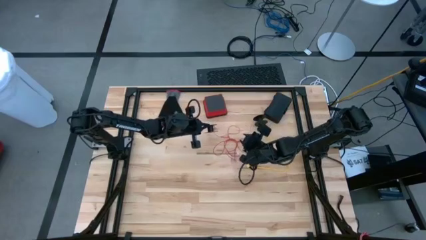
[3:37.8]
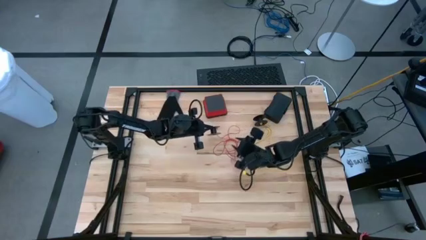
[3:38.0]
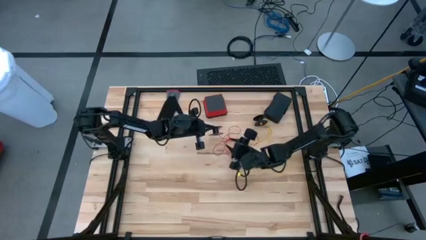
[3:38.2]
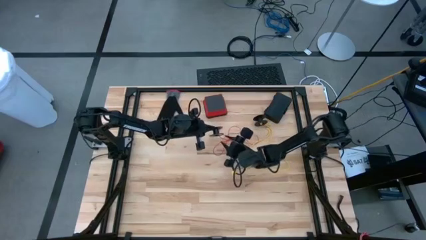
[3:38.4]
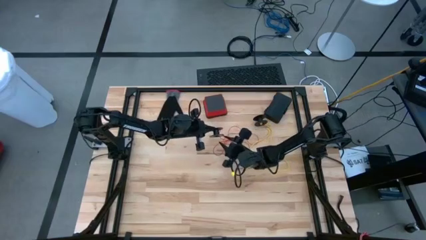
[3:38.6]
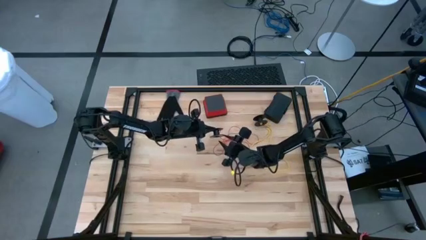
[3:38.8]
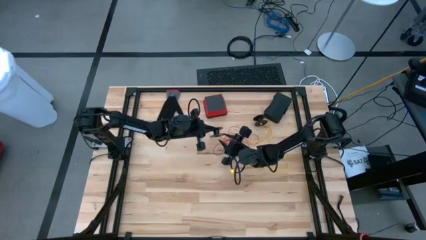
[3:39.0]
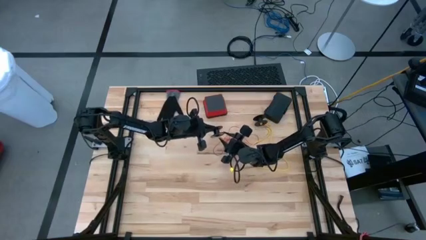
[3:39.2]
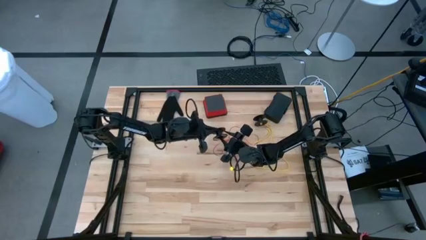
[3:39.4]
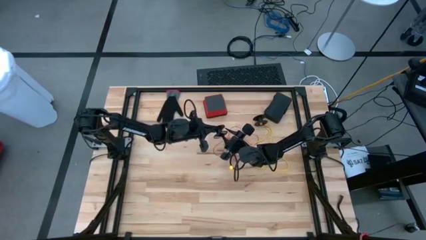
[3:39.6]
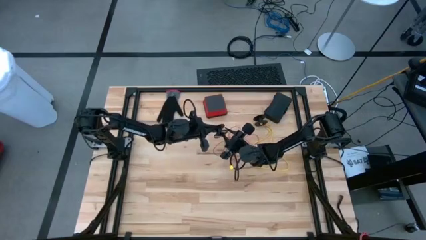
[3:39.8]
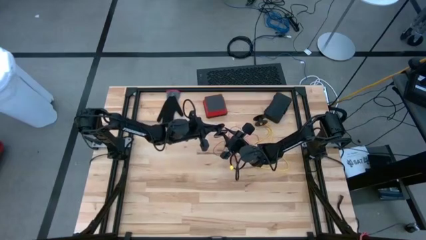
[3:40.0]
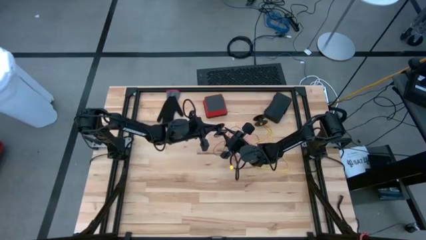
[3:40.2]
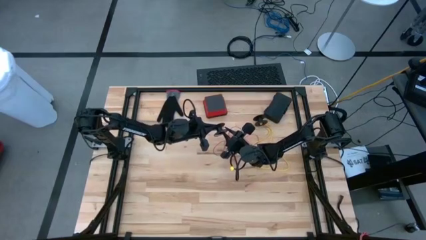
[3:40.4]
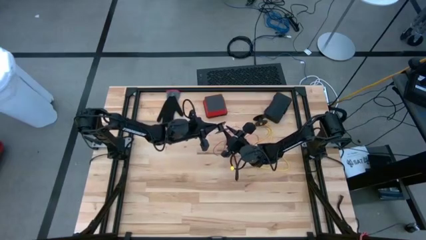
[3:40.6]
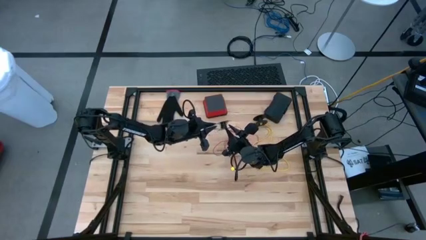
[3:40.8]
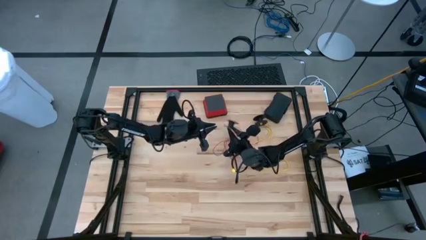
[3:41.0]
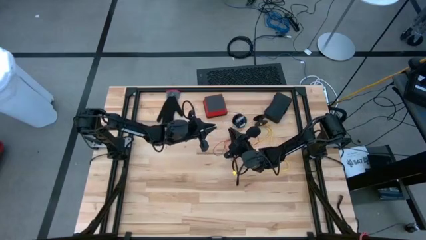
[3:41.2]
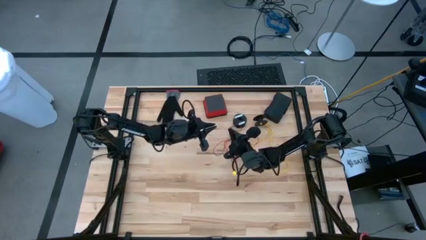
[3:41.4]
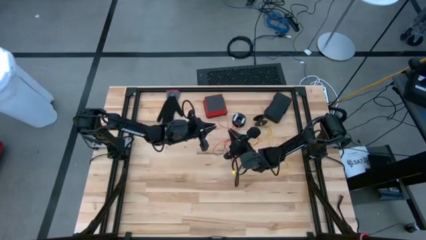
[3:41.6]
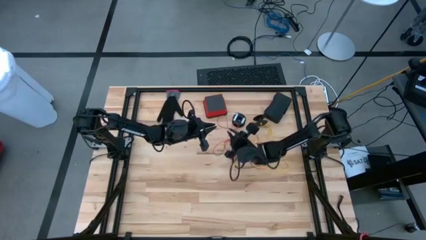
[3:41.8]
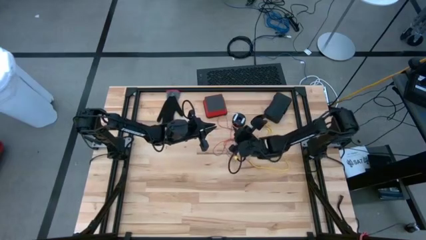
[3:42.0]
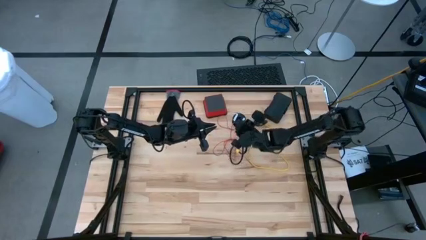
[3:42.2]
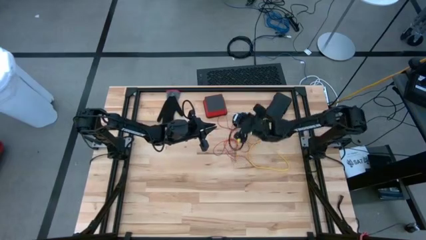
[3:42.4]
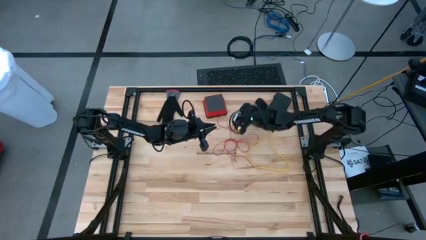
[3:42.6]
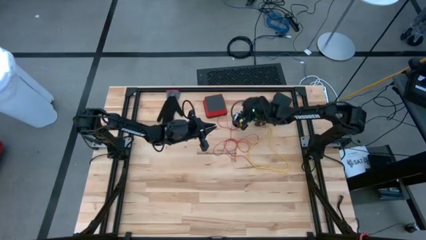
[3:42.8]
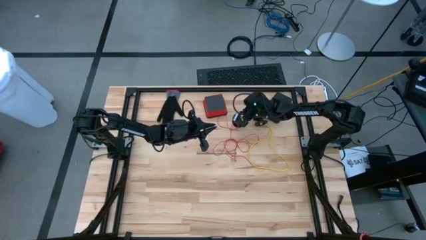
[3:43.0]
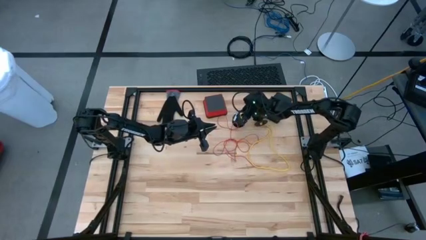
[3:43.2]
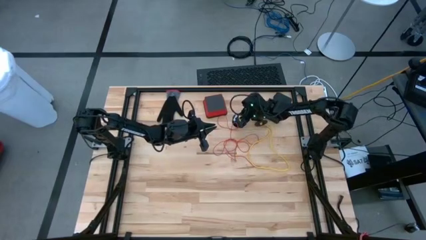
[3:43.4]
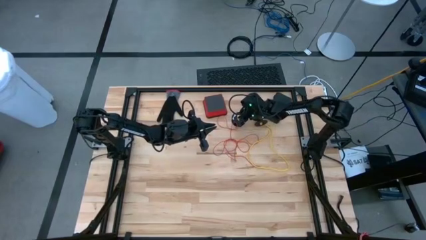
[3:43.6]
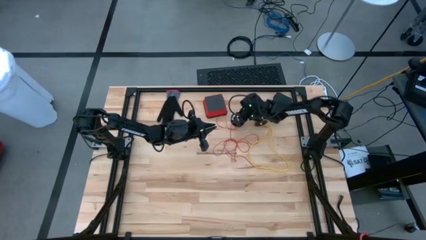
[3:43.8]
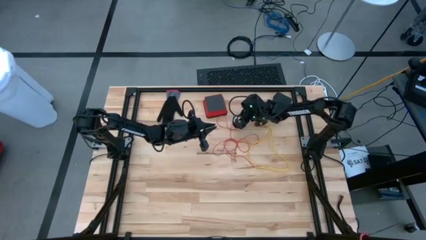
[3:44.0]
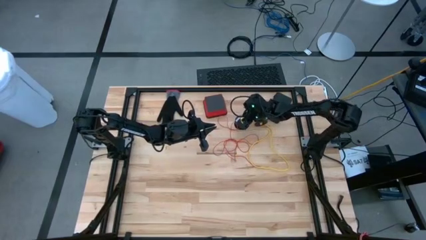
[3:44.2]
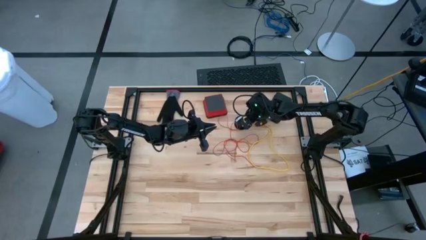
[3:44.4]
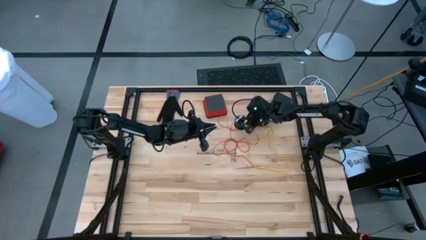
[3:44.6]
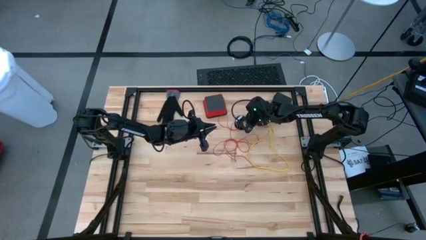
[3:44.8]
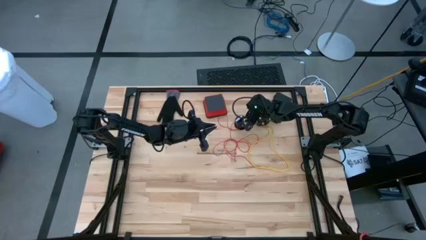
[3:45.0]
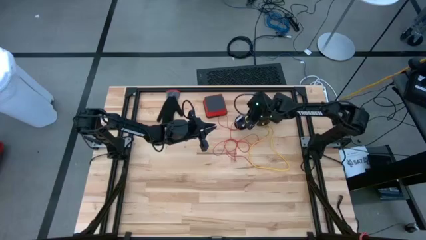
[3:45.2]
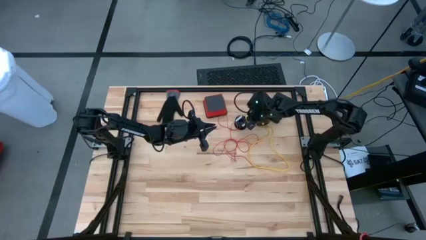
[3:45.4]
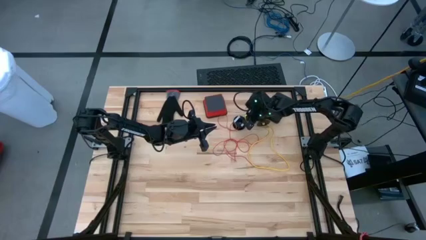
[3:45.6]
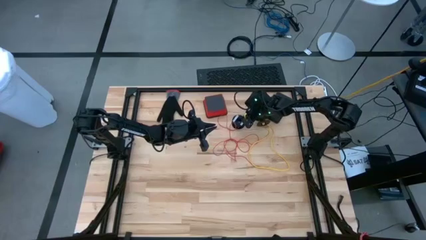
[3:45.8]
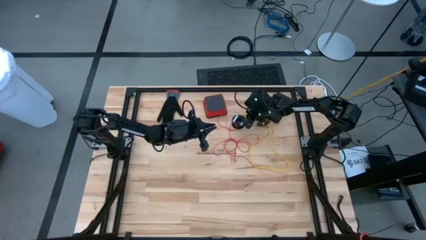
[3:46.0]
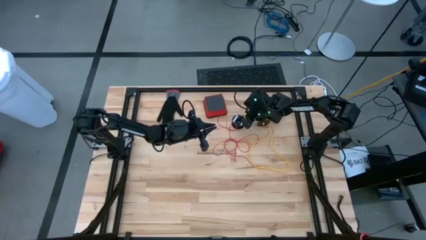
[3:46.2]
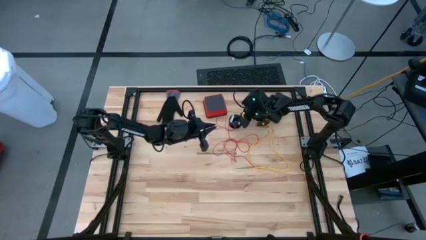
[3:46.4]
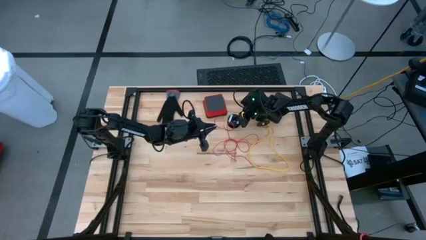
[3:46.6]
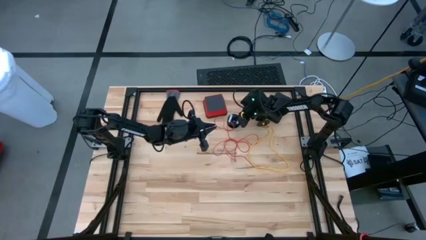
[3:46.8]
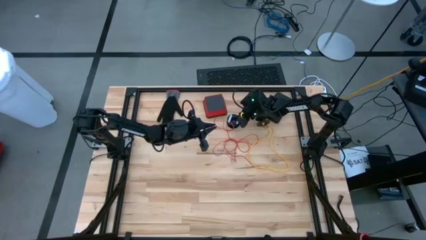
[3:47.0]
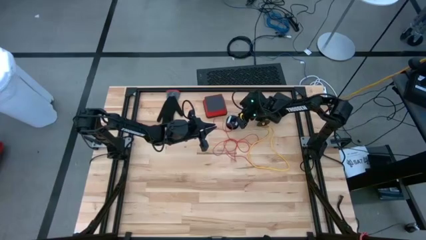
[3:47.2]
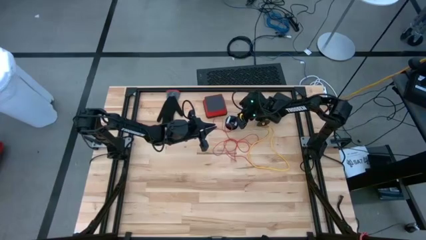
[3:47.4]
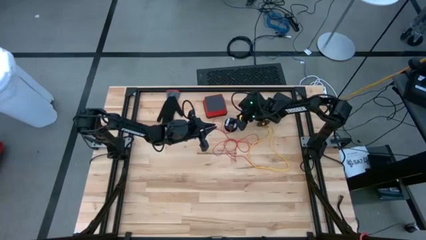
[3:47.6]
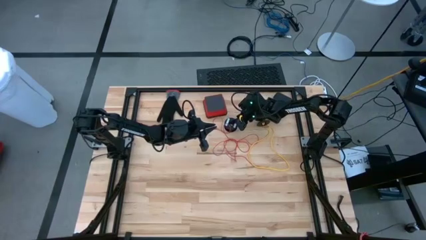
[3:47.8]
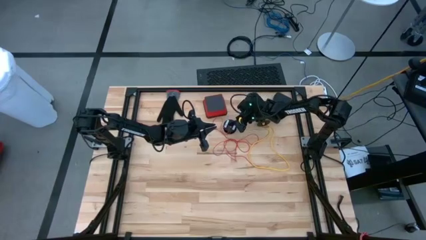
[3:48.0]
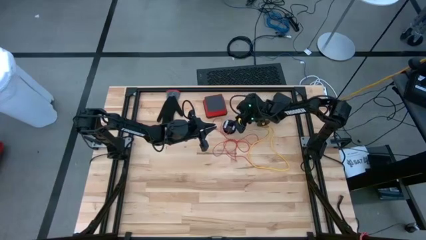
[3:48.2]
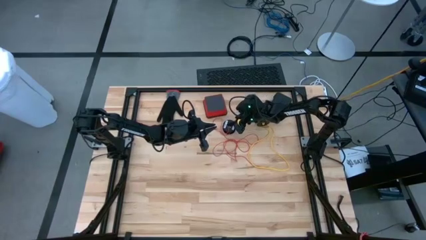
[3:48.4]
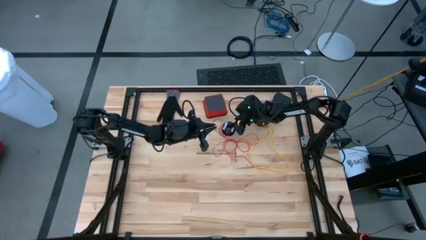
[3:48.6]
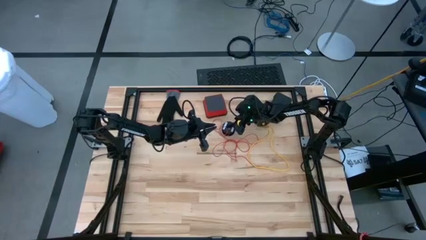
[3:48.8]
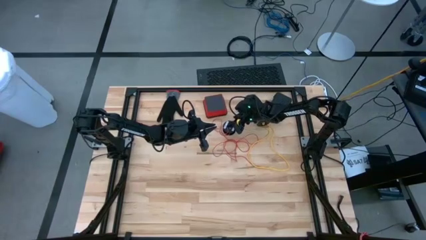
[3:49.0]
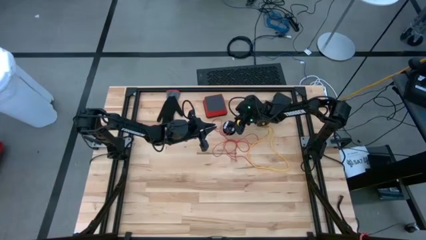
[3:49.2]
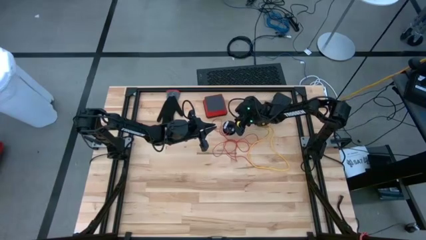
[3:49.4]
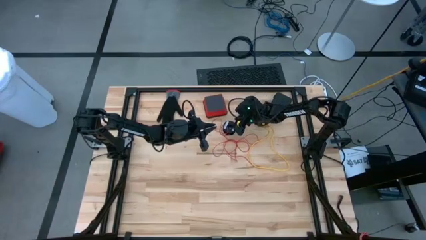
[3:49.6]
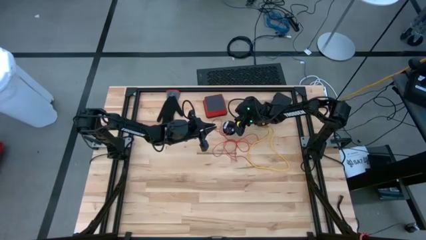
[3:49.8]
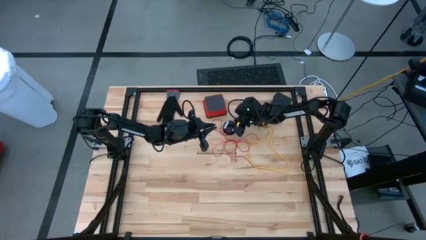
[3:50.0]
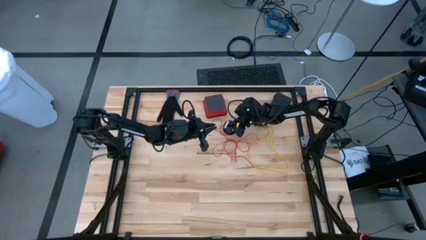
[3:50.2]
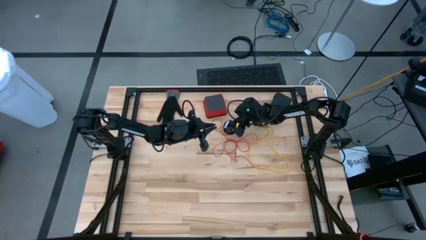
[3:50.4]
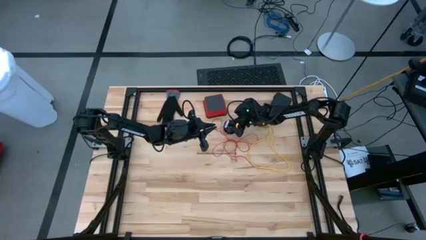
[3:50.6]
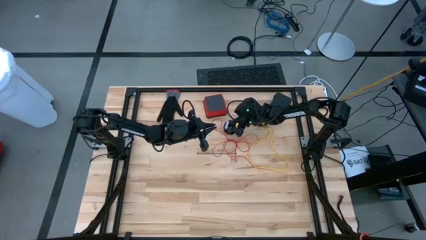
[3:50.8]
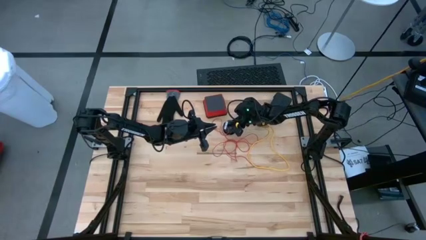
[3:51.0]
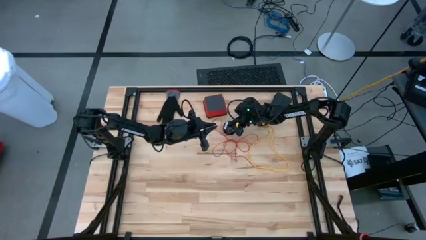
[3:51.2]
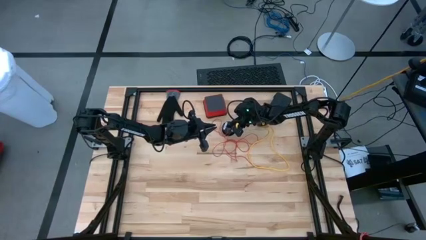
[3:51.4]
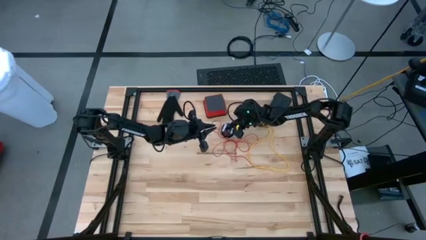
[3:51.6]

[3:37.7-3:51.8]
Task: Coil cords
Uncoil the red wire from the spool

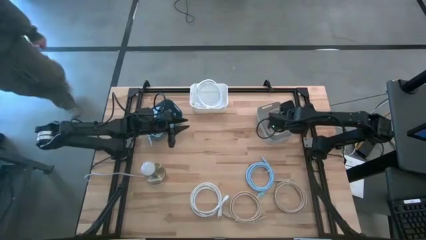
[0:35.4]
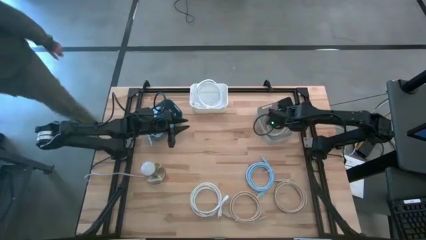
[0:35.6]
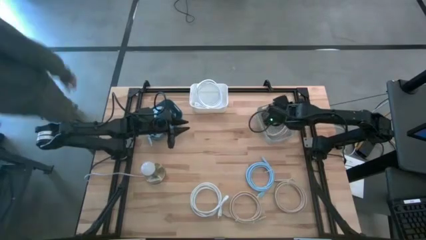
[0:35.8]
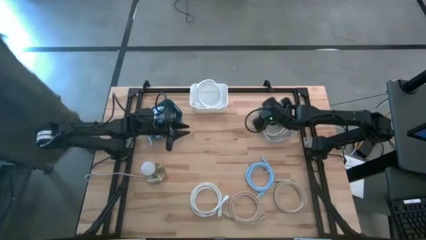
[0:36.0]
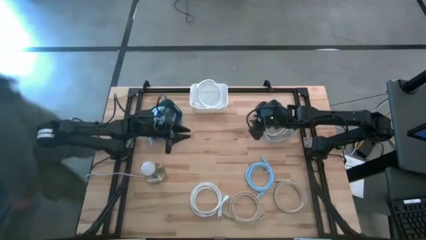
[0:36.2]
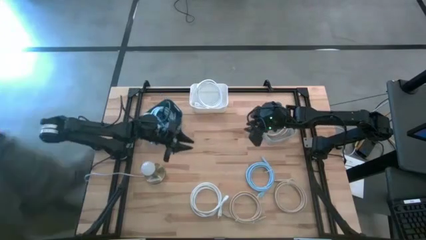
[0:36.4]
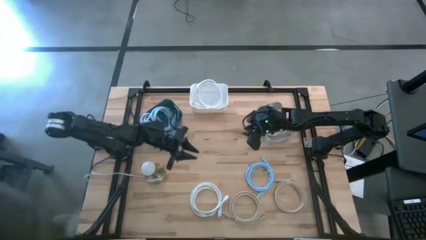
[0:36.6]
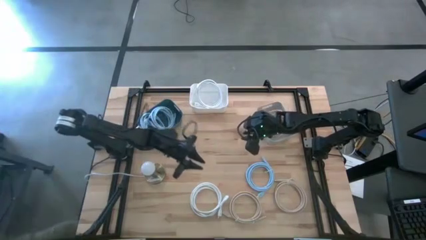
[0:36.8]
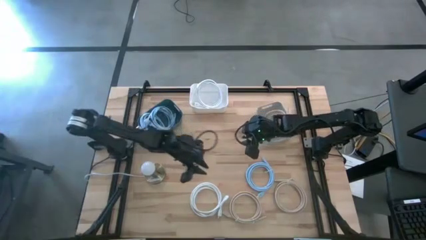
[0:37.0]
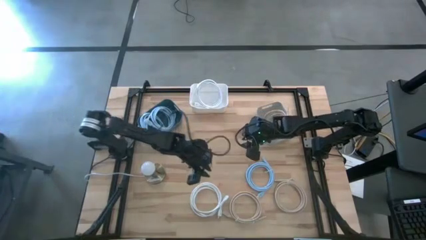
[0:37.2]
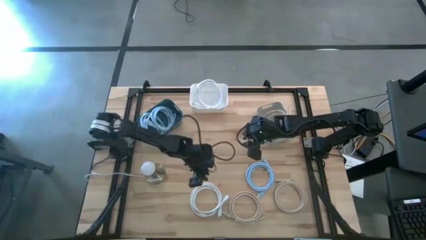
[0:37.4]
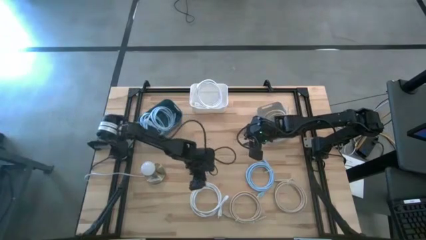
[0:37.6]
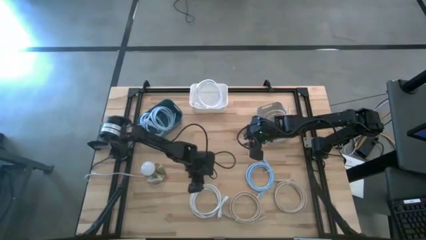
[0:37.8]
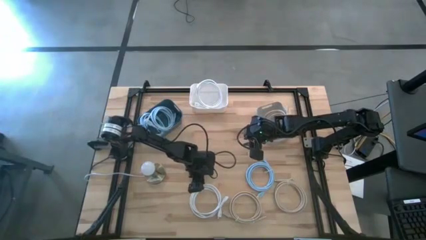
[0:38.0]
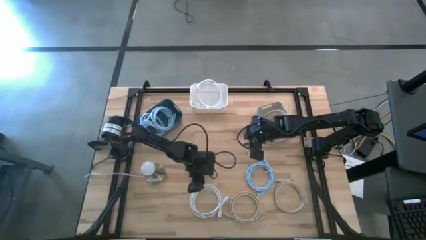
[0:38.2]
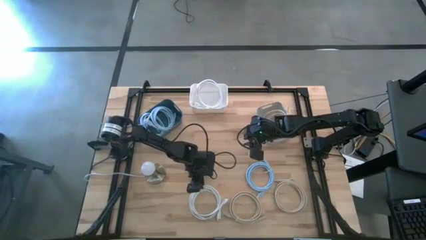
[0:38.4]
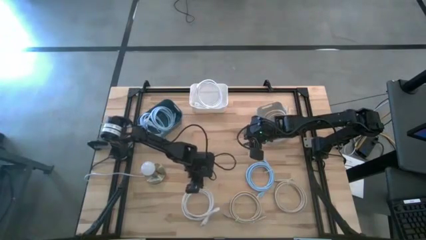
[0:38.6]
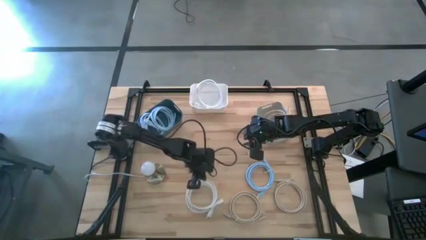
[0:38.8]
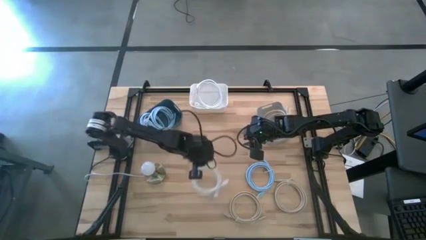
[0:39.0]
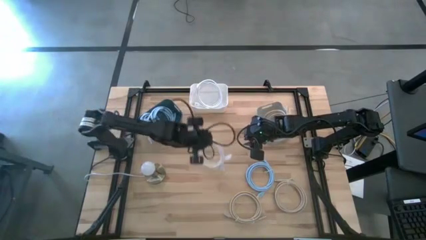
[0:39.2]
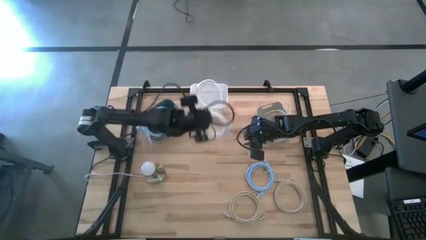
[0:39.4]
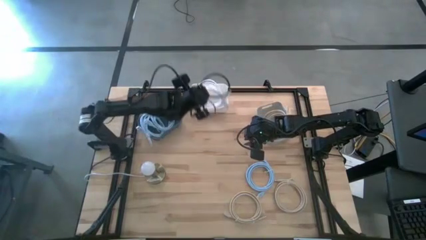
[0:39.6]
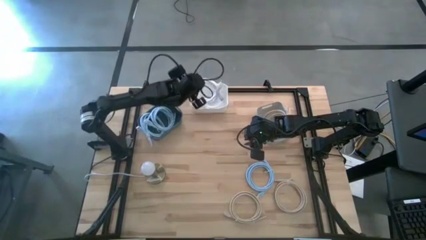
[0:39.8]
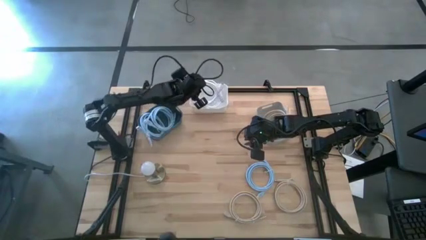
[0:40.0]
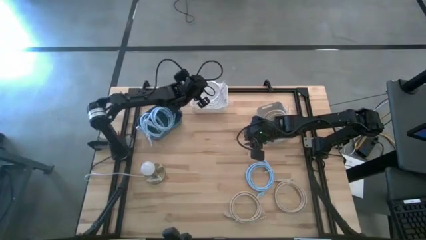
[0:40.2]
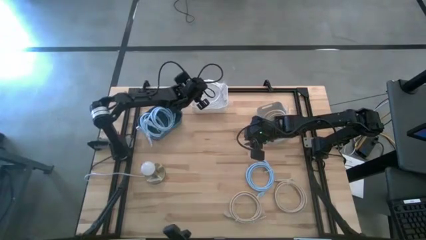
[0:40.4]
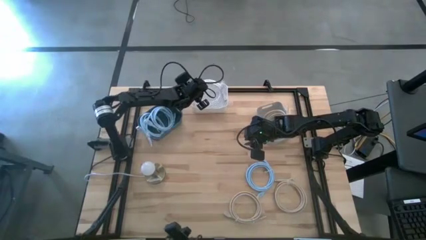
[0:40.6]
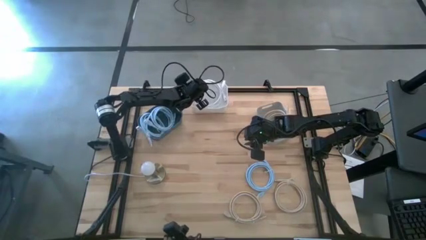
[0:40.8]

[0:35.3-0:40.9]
Task: Sort HDMI cables
Put the white hdmi cable into the white bin
